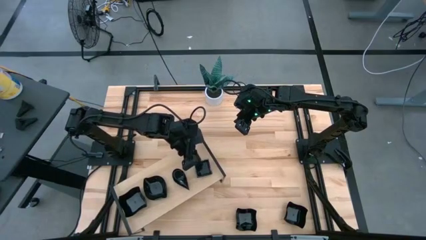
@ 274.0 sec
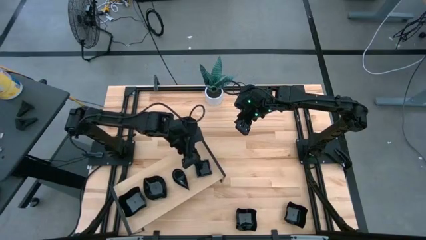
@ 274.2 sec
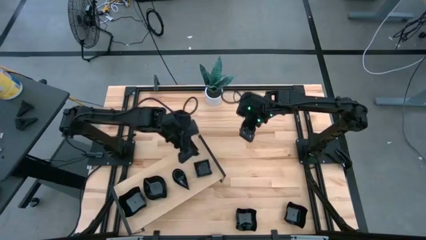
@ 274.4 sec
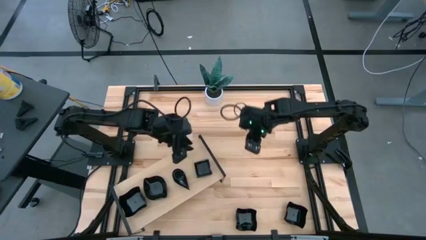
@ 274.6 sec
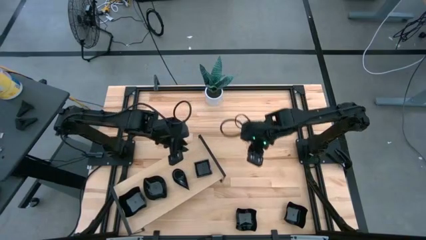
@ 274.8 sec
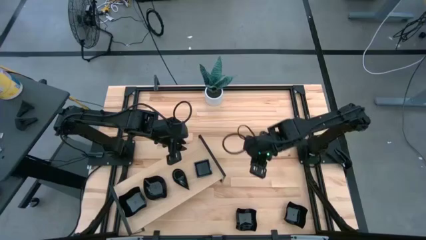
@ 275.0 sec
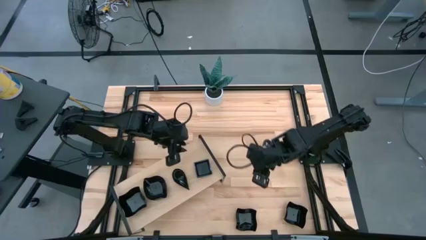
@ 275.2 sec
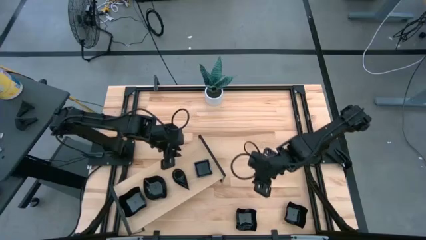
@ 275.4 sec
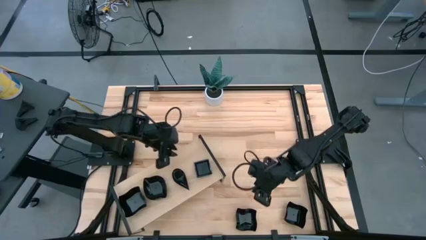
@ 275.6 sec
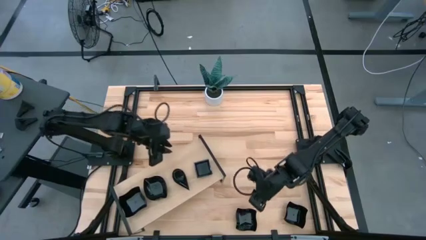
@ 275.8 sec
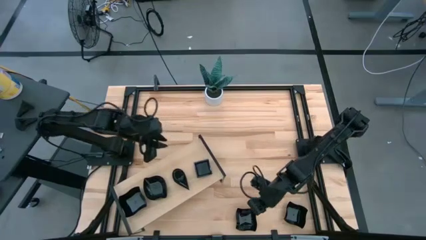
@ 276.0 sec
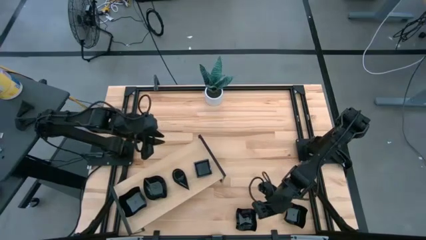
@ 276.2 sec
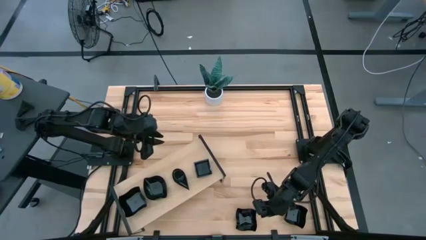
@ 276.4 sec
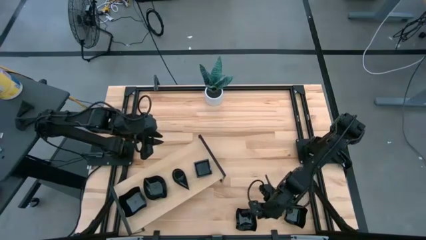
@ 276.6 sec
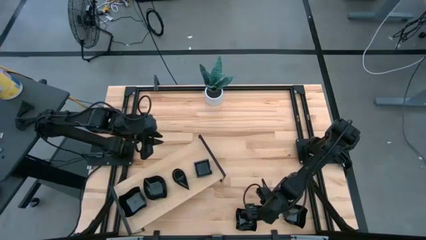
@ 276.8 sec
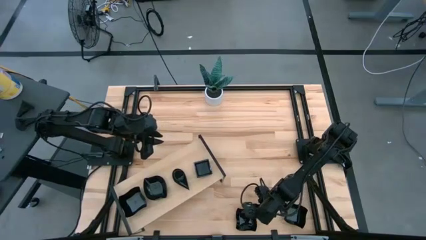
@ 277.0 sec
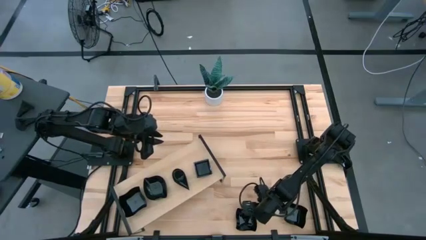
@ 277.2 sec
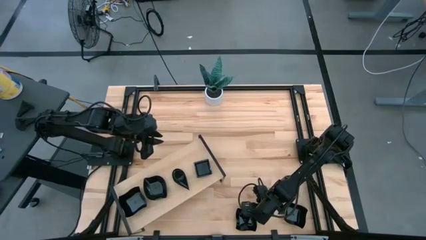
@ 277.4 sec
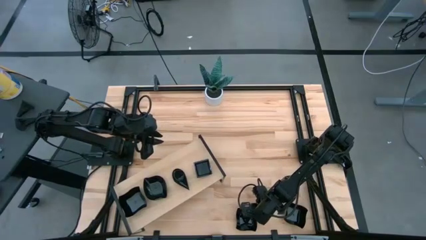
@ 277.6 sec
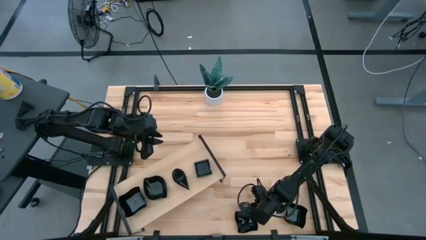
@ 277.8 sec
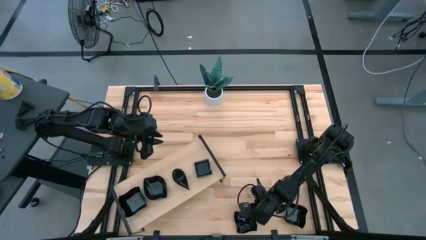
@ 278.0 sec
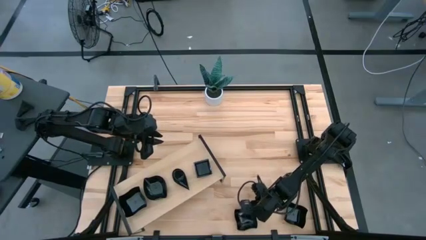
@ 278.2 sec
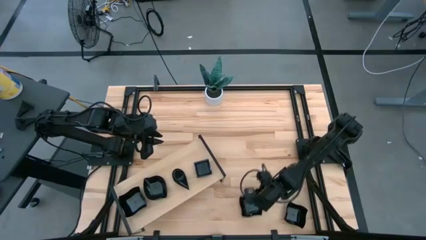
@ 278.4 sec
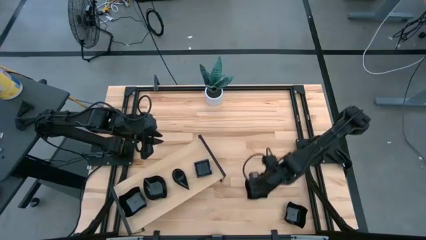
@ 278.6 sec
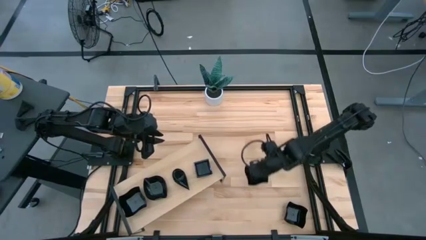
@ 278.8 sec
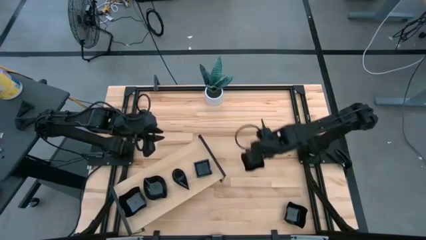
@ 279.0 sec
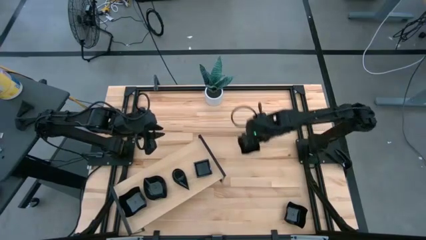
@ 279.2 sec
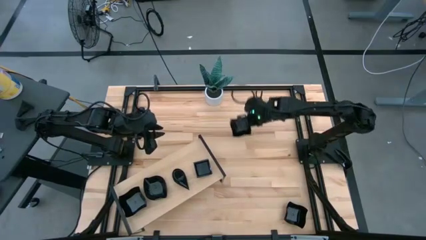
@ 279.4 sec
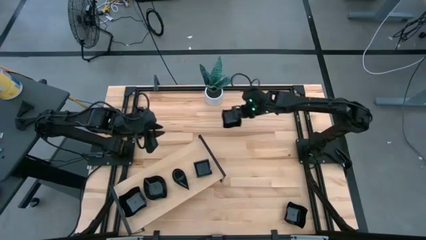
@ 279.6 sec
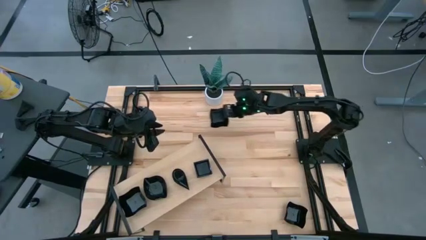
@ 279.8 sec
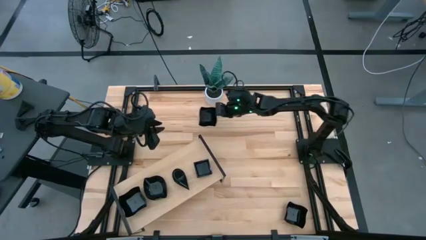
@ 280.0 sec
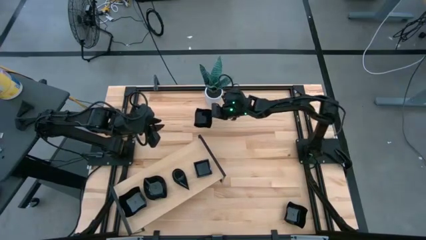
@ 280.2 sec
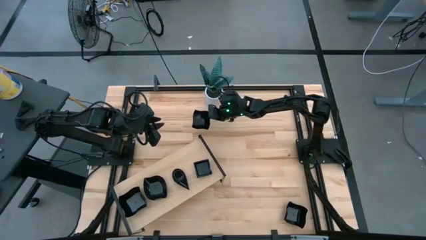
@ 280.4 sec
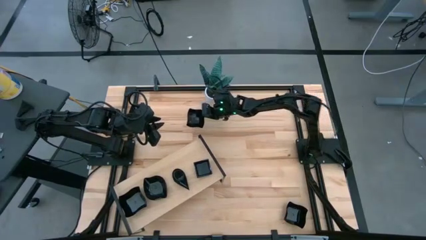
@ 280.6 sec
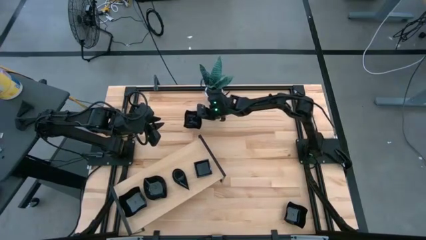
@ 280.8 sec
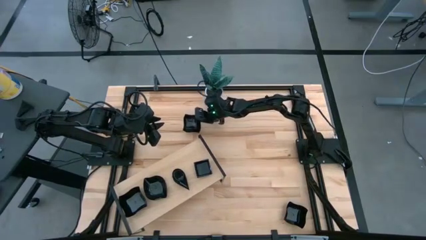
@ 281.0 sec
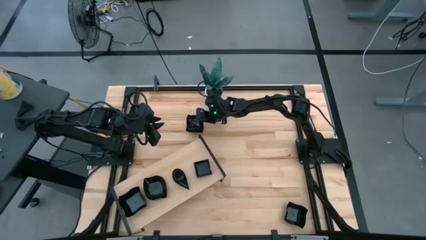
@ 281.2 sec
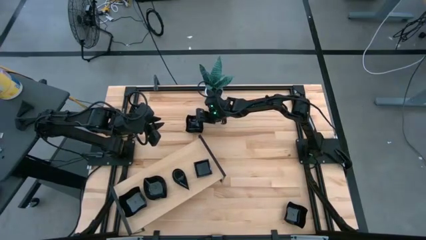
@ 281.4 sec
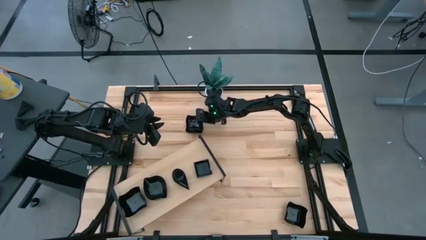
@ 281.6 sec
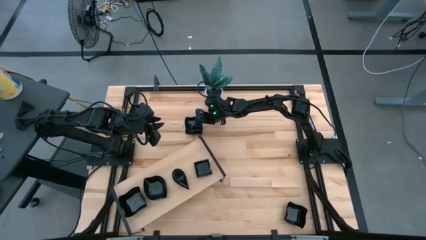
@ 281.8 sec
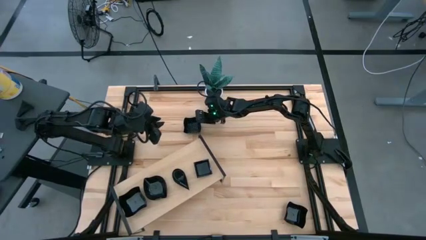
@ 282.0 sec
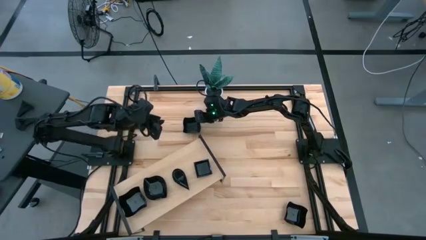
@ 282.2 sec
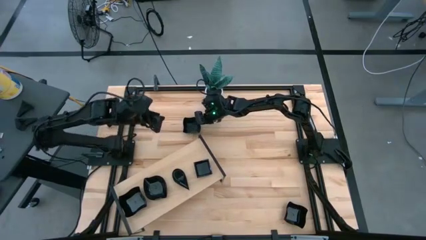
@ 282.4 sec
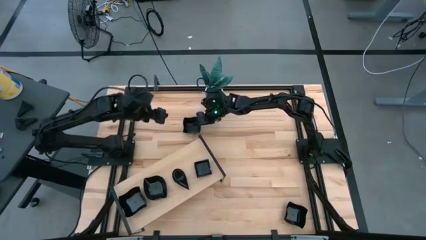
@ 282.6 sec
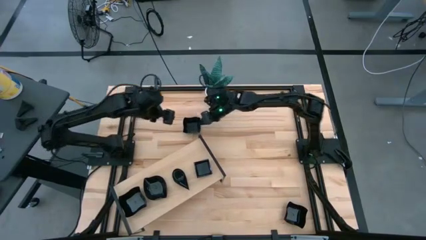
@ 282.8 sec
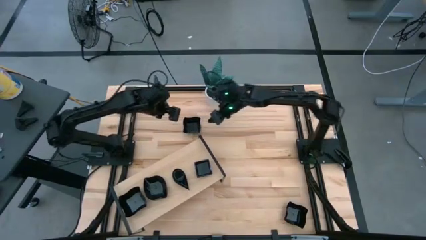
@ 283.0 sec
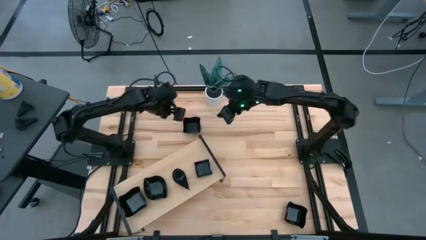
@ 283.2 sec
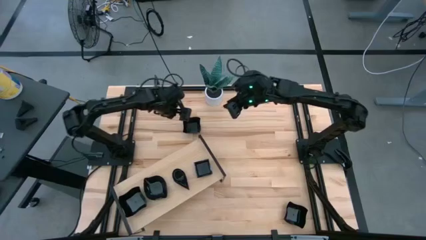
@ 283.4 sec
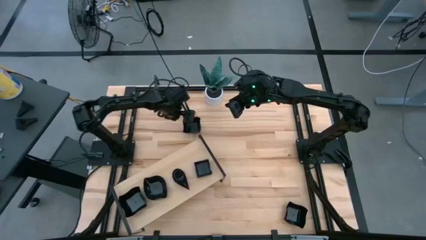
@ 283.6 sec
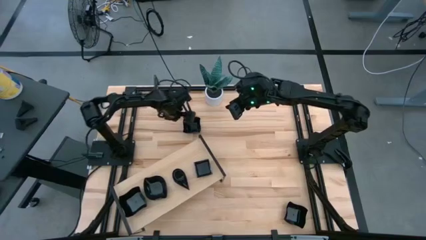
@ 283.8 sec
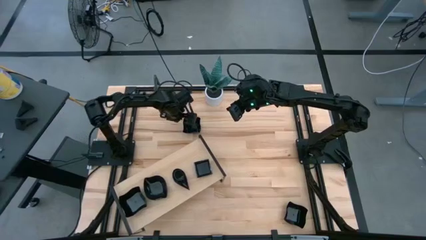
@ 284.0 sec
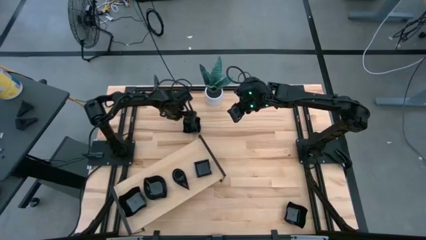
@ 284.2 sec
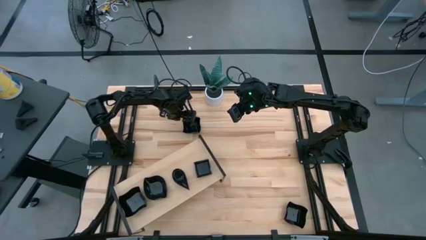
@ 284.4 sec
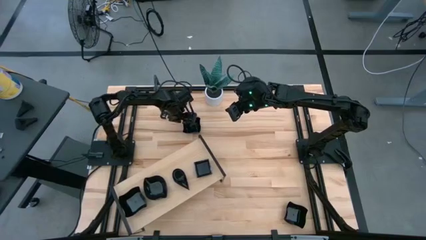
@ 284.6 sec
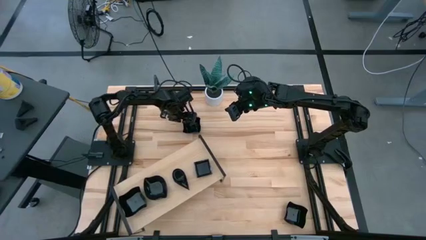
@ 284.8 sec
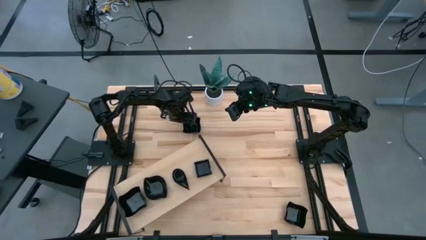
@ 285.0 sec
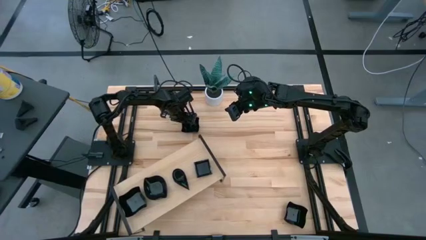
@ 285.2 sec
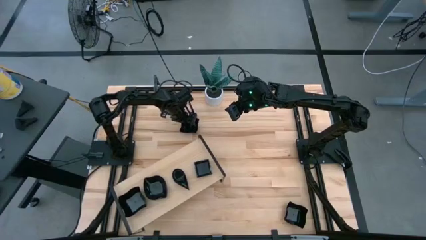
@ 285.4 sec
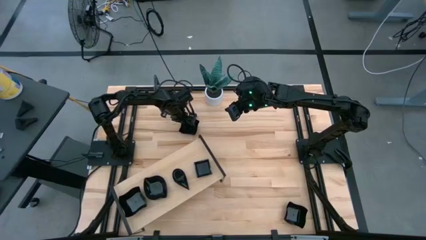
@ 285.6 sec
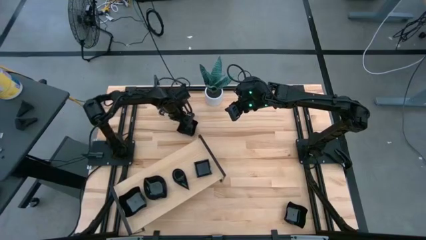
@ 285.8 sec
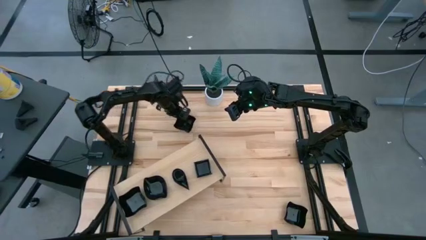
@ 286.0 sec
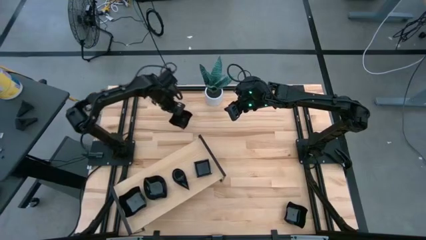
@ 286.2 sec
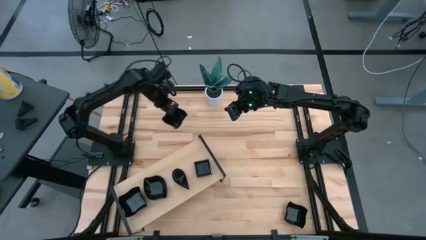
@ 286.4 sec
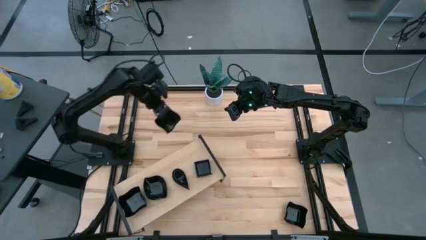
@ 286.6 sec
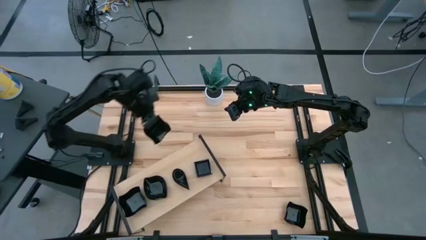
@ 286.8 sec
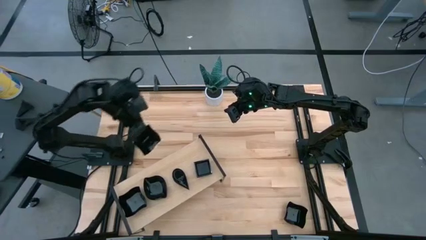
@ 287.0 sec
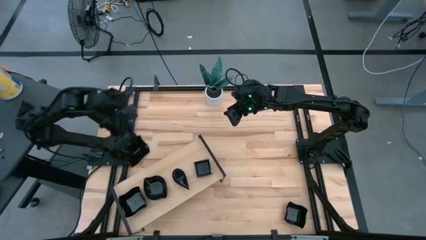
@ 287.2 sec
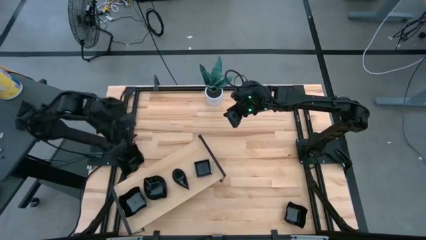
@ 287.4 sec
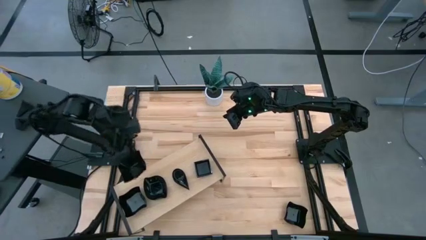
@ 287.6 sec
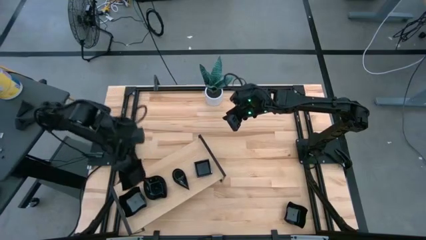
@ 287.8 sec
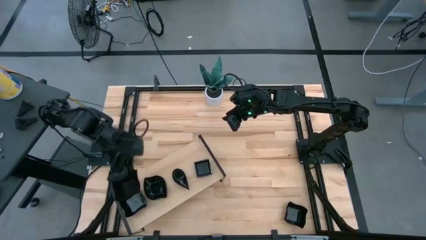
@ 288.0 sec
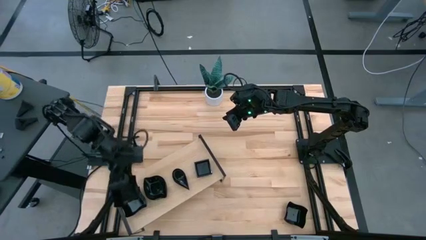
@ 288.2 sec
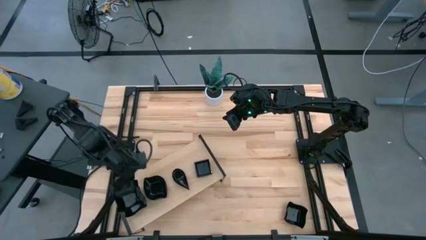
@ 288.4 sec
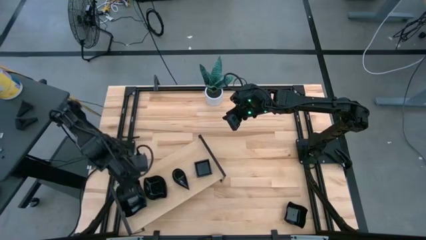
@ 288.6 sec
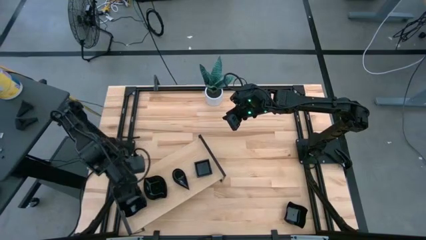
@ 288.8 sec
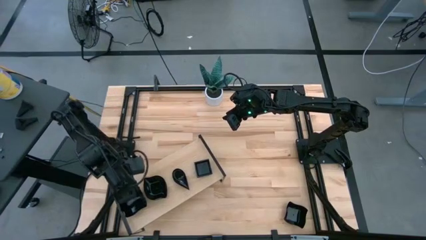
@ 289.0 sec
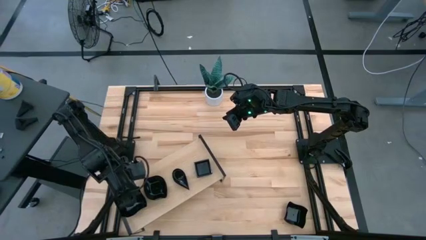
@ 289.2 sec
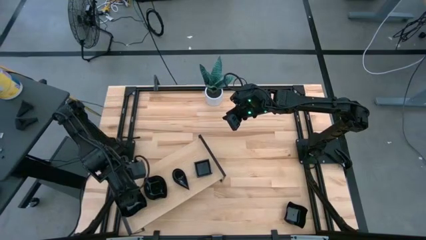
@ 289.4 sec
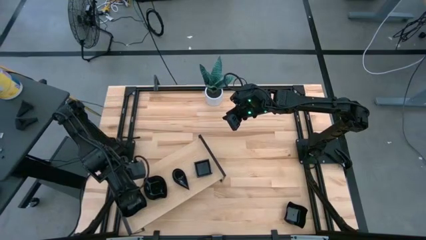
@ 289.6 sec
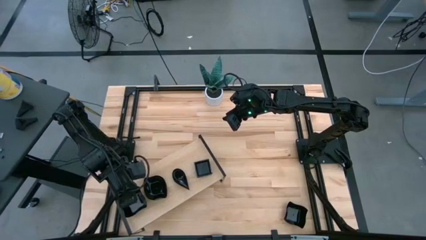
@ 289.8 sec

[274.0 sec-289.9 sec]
Task: Pick & Place Mini shaped plates
Stack the black distorted square plate on top of the black distorted square plate on the shelf
